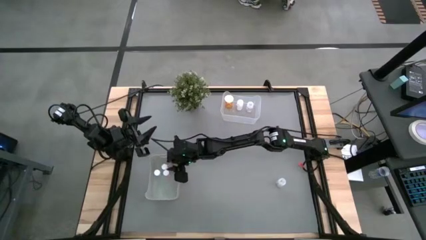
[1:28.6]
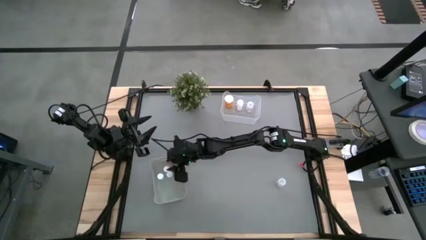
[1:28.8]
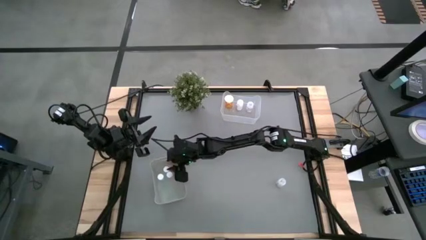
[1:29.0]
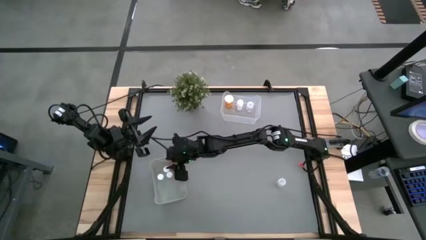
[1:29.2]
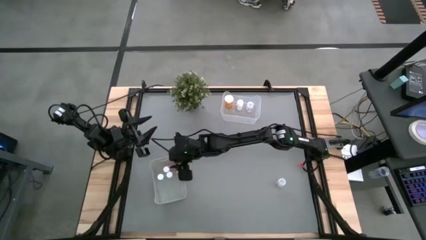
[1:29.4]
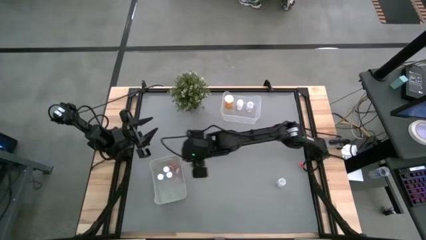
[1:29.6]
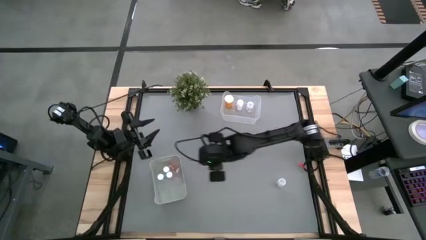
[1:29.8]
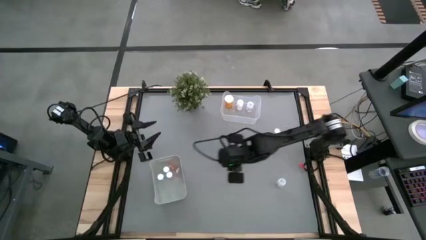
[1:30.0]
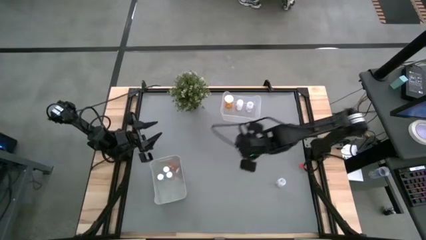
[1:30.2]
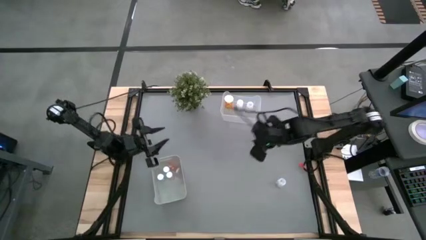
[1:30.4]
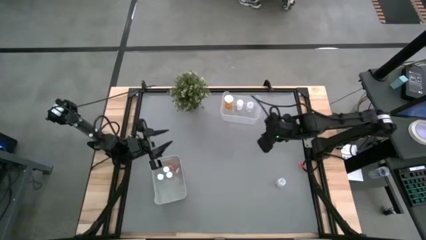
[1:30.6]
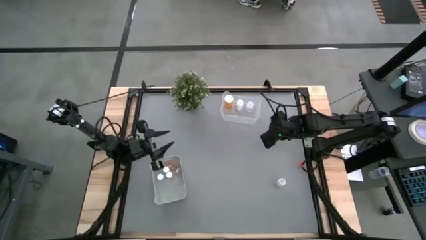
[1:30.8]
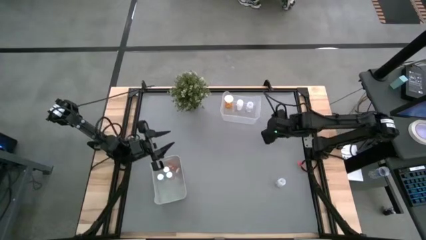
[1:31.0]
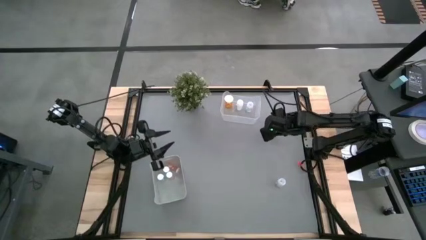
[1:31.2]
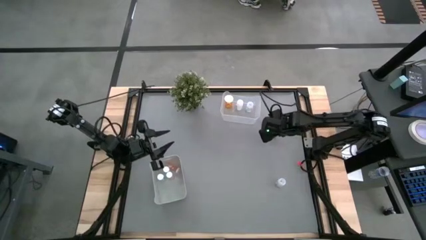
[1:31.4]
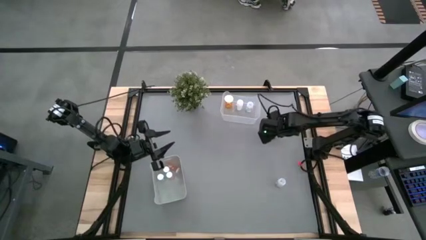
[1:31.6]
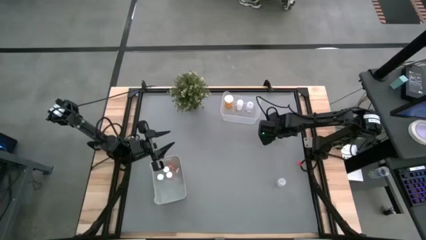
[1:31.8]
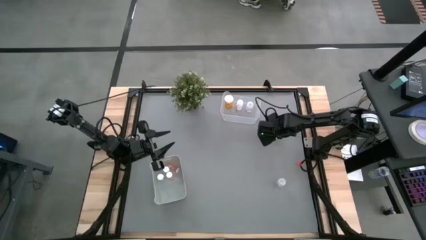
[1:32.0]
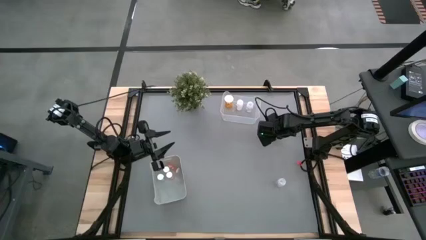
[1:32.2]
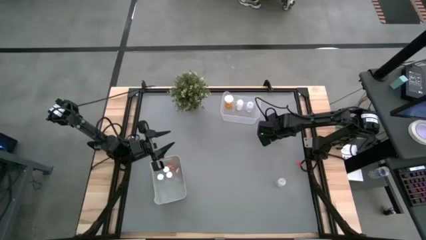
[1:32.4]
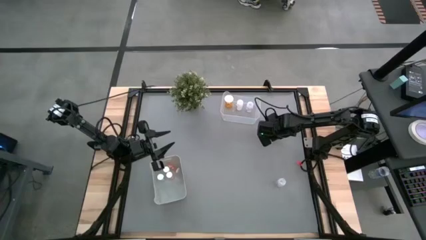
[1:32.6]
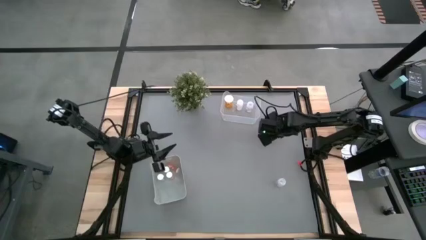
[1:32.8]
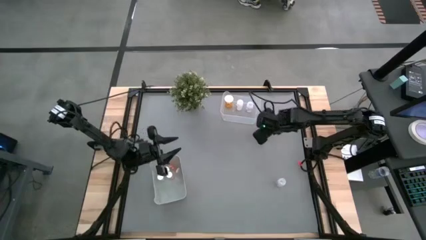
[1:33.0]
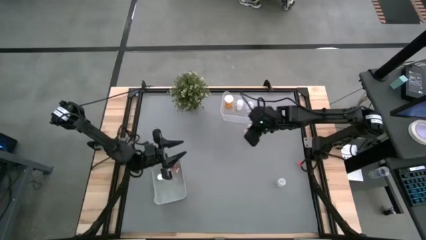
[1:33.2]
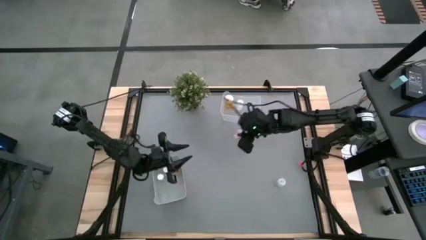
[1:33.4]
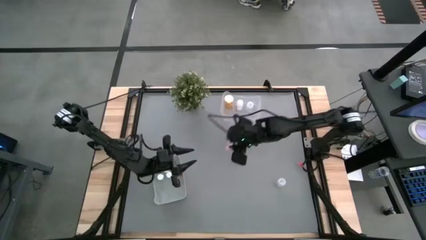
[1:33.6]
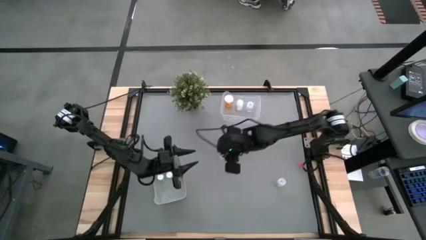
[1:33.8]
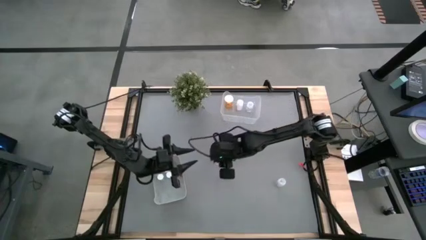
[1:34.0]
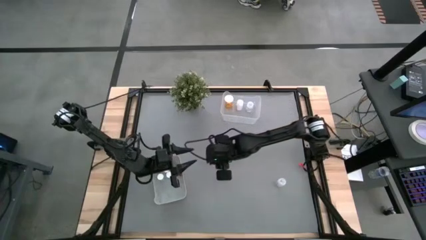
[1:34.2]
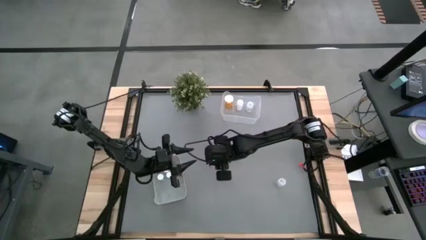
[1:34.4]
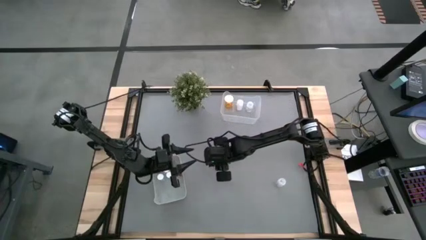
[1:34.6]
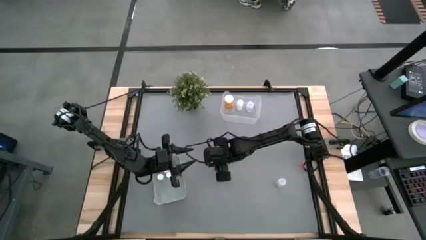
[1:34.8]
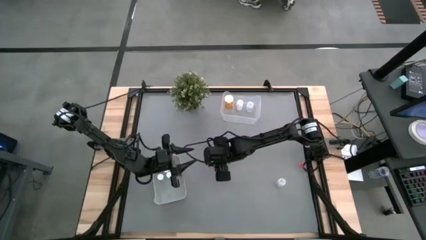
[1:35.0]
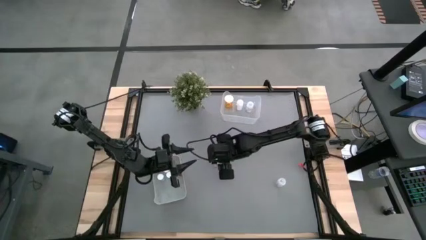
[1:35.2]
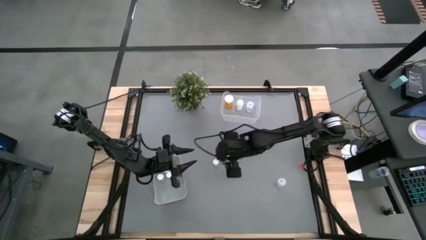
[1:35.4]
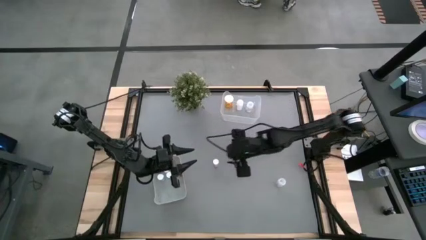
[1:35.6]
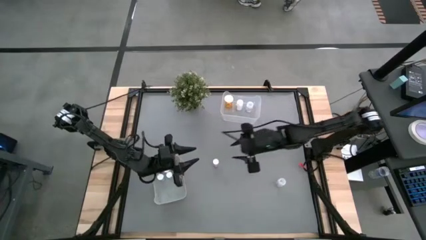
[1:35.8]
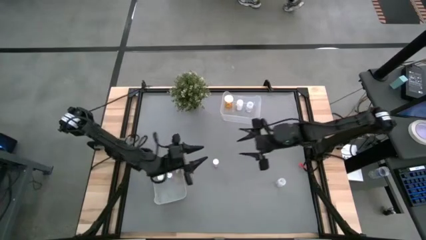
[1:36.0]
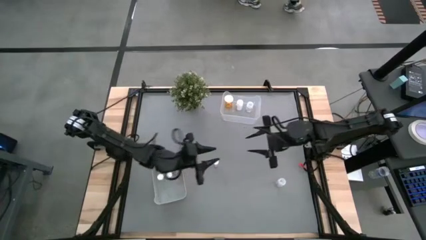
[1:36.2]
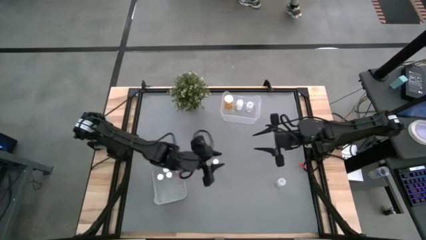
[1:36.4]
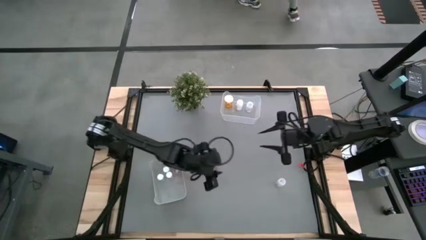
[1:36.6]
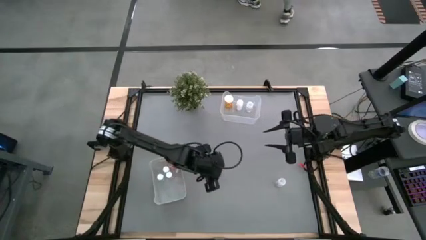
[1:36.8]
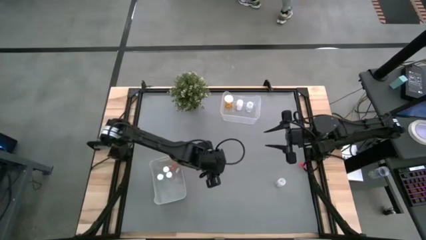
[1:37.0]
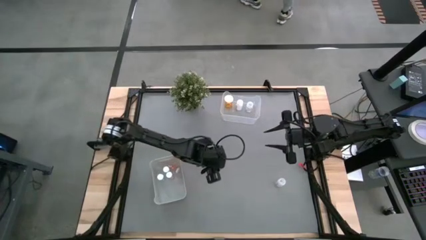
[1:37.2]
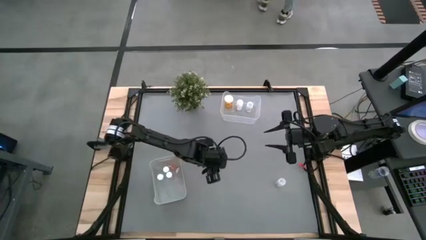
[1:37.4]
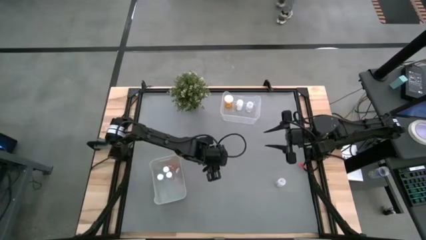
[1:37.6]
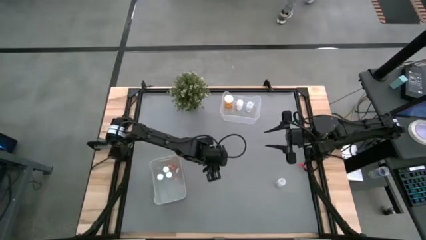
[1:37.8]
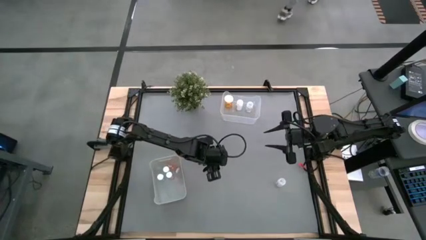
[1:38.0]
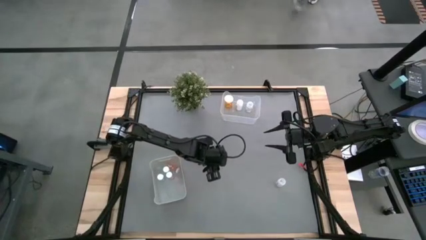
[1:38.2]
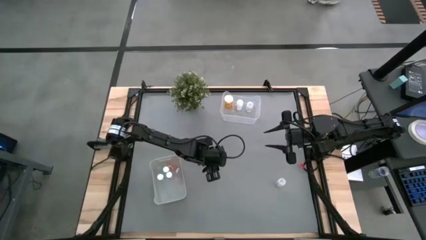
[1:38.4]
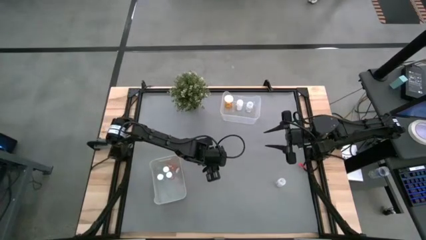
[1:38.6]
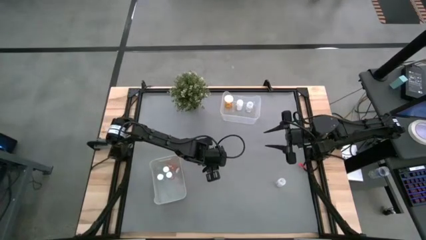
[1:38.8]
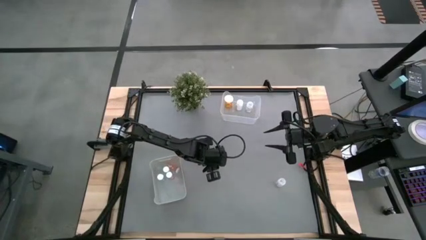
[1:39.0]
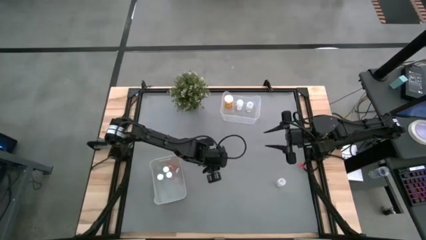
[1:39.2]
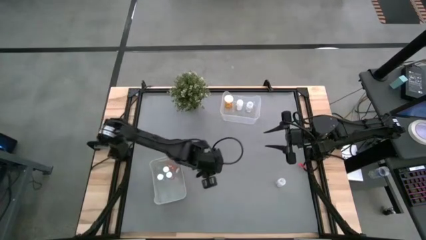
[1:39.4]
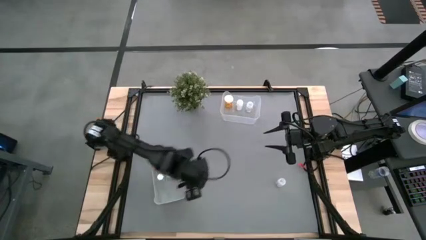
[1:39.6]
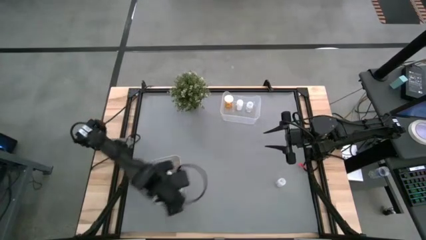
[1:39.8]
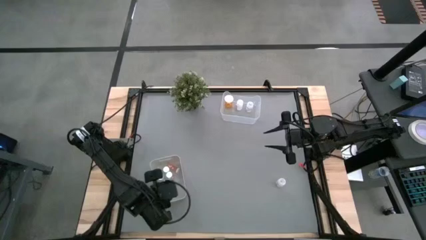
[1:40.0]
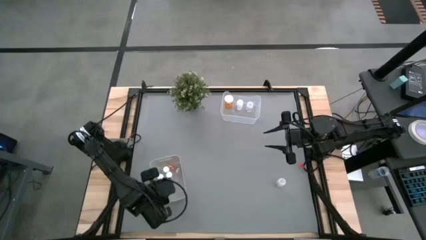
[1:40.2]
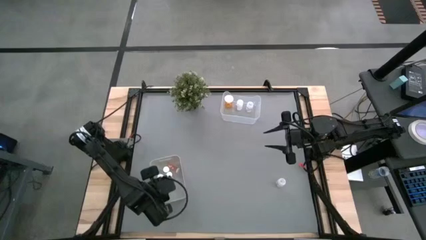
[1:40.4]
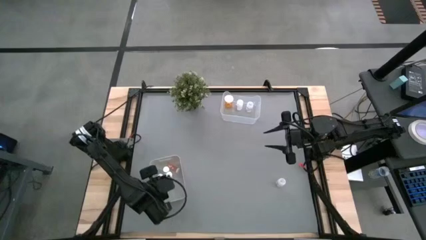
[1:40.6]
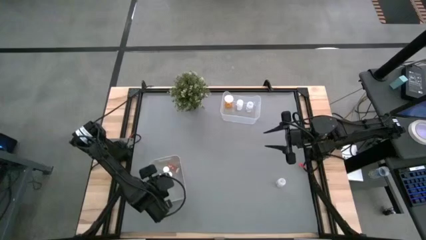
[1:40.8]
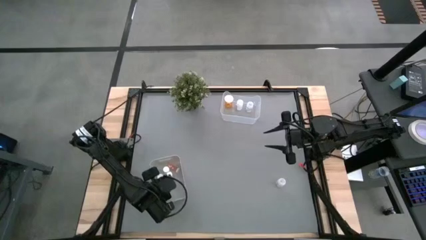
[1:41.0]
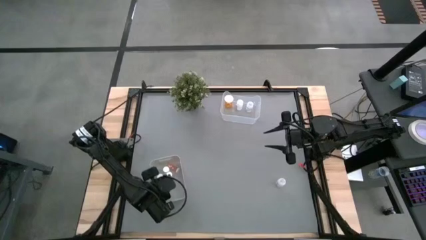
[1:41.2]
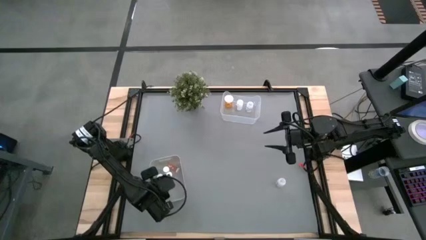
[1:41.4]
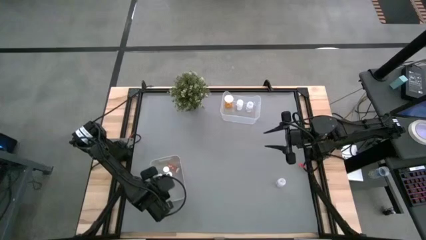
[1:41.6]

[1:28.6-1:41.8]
Task: Pick and place medicine bottles into bin by pill shape (circle, oval)
Put the pink tablet bottle into the gray bin

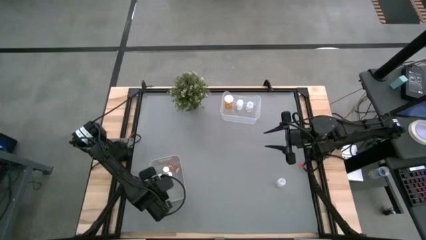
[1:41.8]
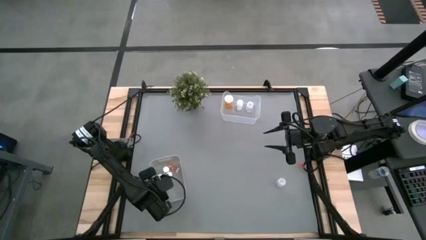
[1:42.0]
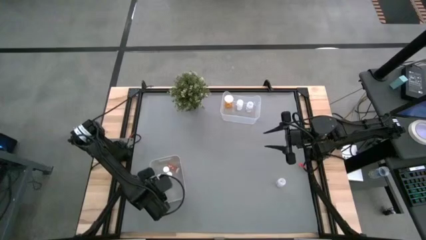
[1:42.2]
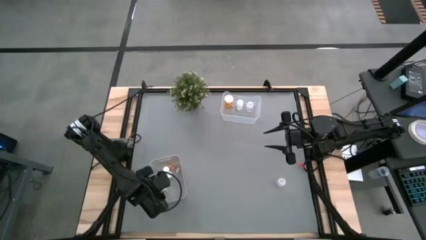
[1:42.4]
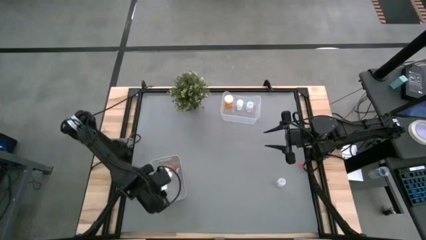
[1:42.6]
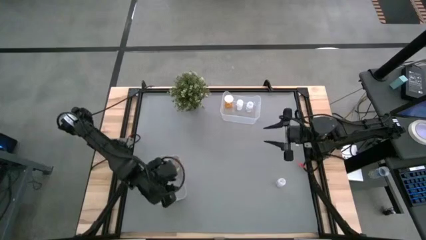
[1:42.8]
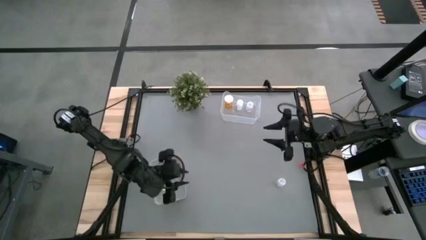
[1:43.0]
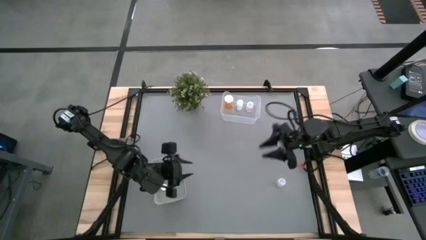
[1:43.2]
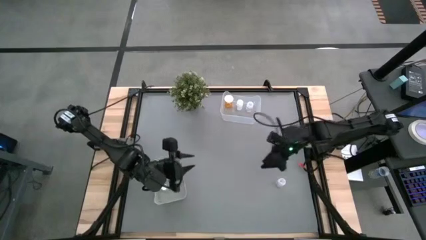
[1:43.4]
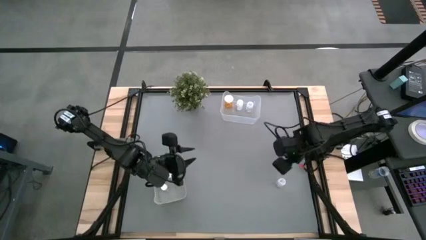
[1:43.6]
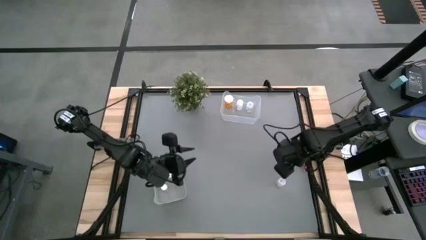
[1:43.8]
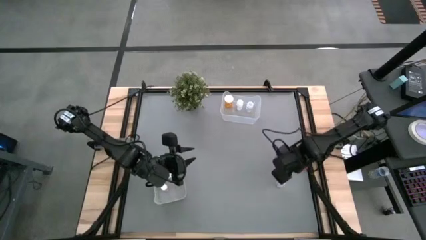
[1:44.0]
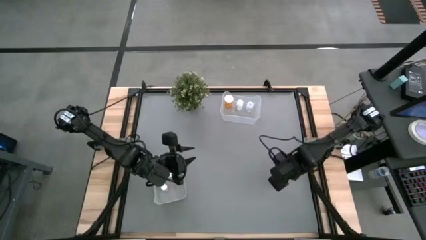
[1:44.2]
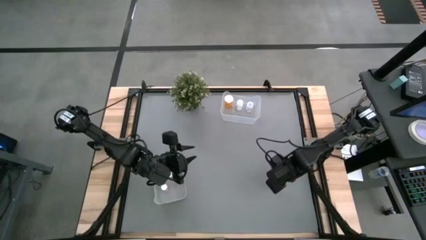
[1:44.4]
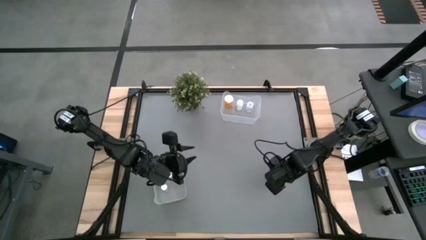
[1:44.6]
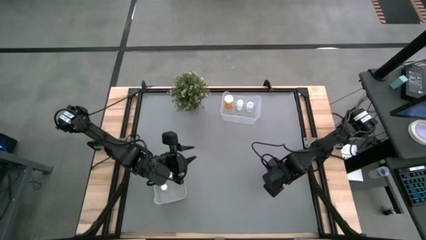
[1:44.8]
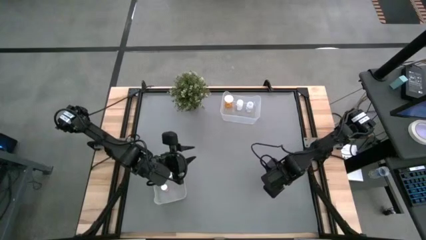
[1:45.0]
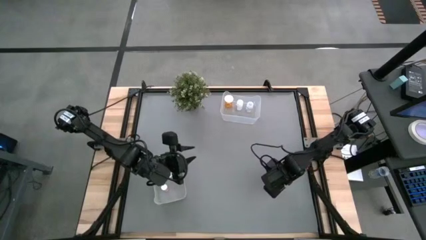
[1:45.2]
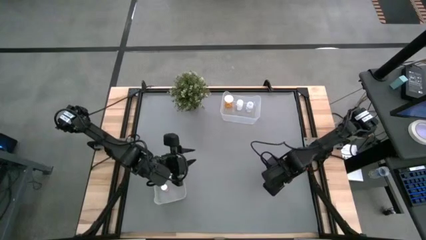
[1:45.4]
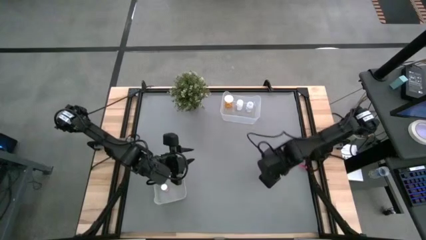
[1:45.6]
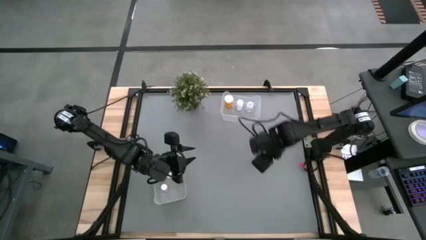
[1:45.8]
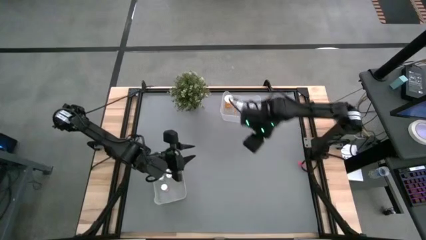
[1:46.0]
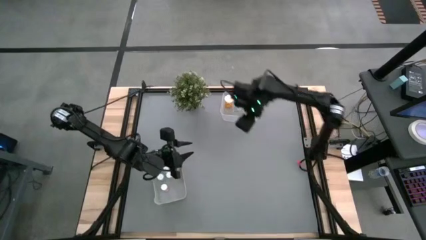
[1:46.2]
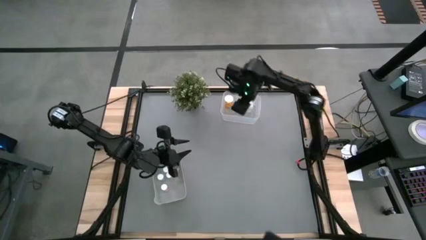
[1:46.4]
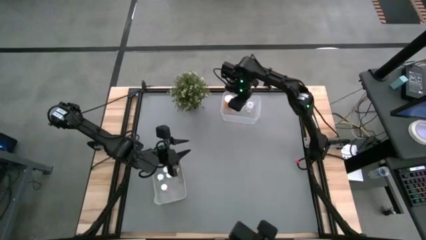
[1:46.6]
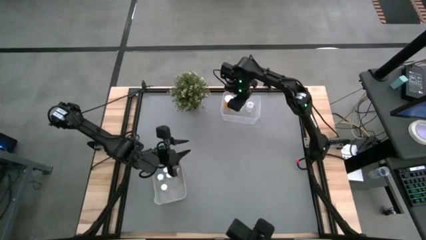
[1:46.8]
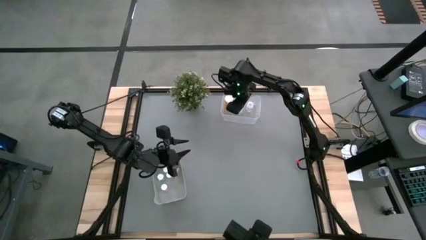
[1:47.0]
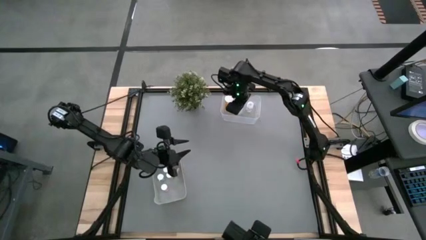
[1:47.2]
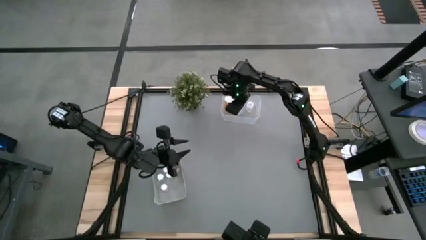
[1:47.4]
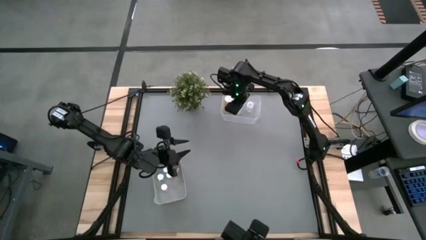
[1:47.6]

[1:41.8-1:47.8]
Put the white capsule bottle into the transparent bin
